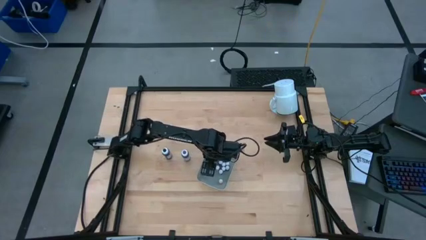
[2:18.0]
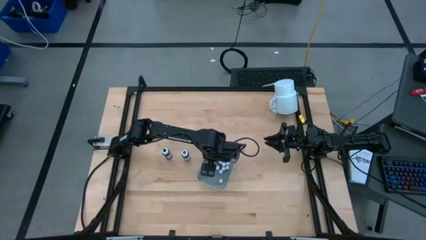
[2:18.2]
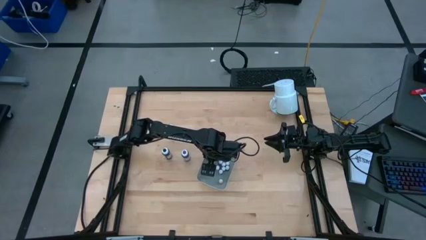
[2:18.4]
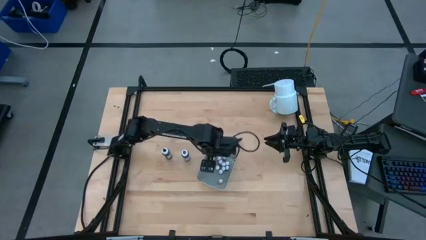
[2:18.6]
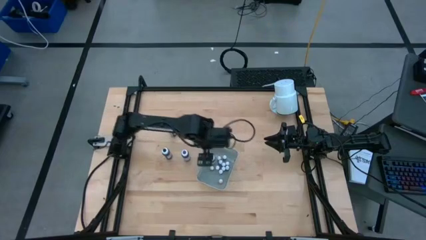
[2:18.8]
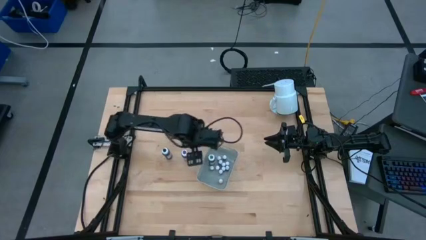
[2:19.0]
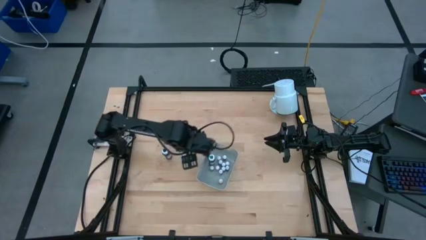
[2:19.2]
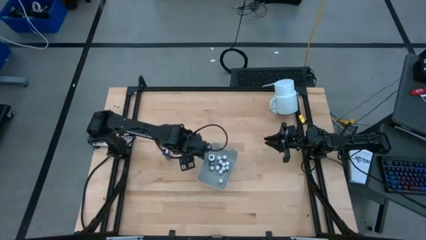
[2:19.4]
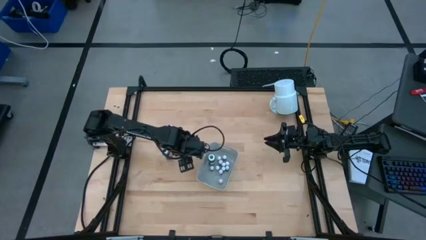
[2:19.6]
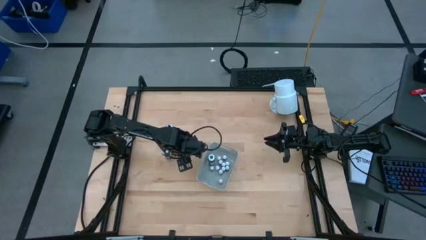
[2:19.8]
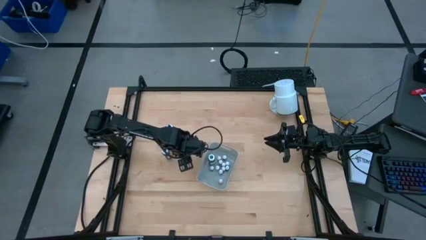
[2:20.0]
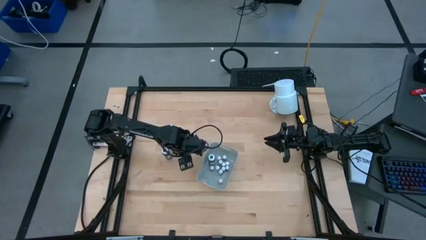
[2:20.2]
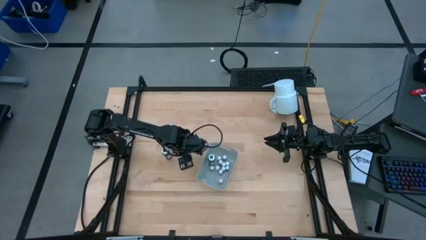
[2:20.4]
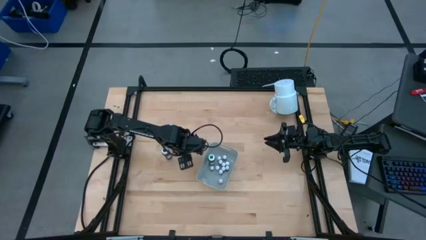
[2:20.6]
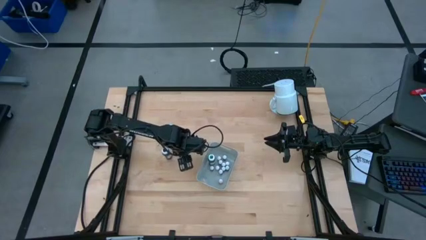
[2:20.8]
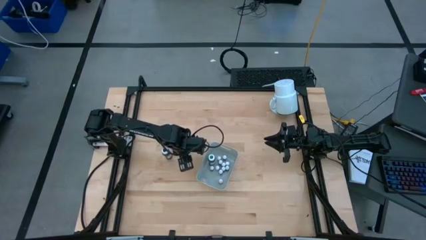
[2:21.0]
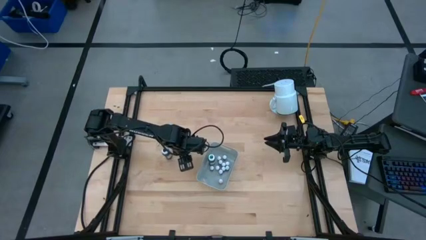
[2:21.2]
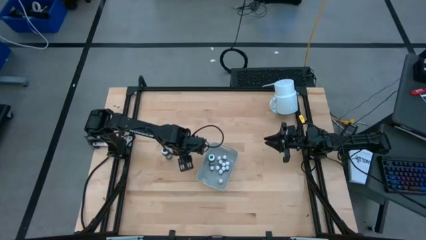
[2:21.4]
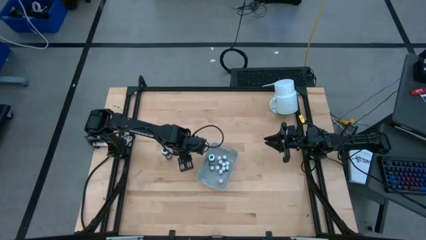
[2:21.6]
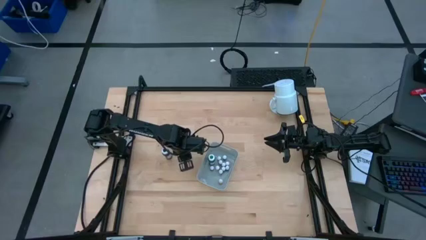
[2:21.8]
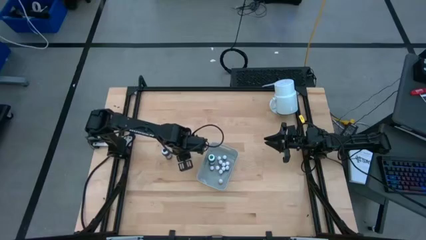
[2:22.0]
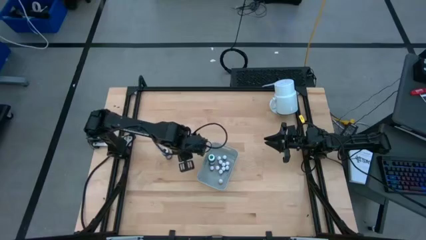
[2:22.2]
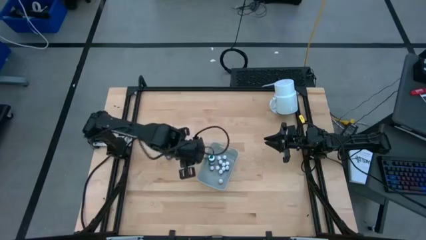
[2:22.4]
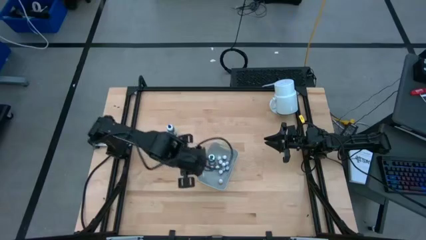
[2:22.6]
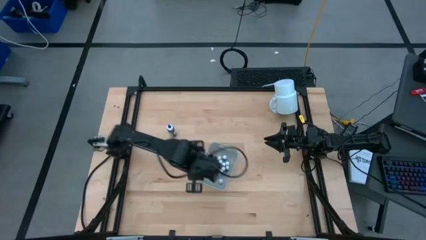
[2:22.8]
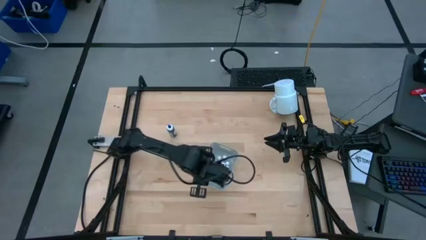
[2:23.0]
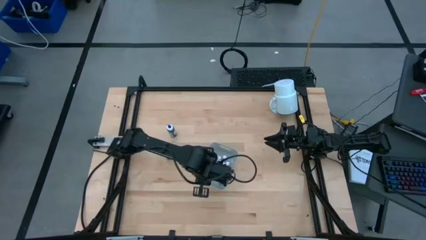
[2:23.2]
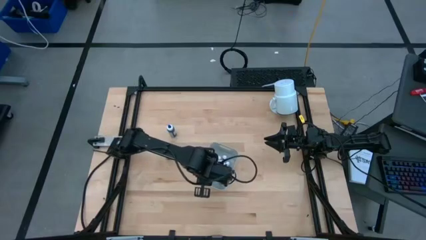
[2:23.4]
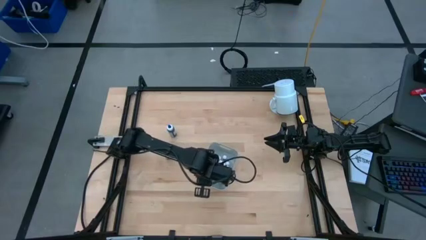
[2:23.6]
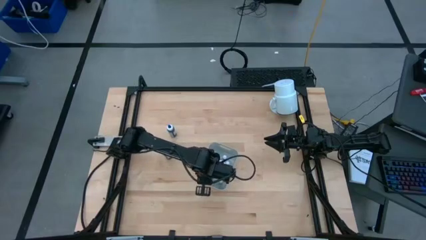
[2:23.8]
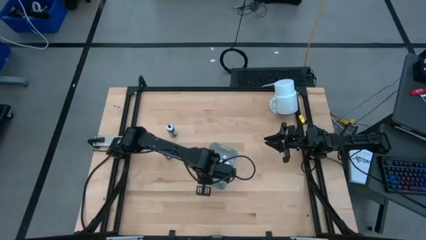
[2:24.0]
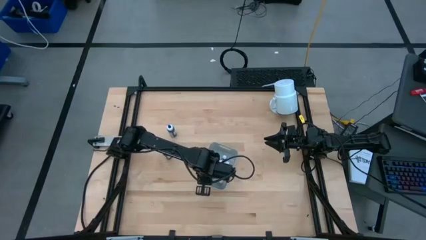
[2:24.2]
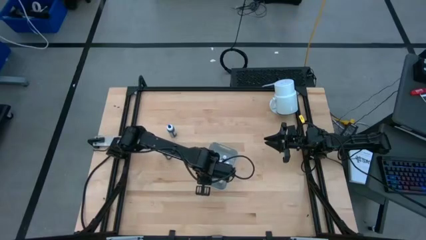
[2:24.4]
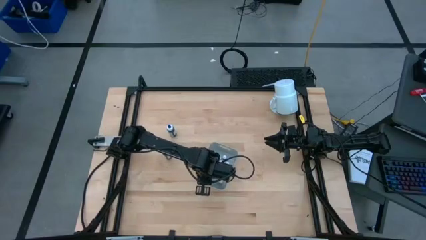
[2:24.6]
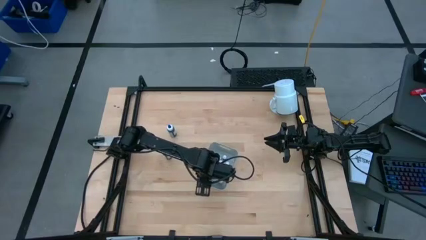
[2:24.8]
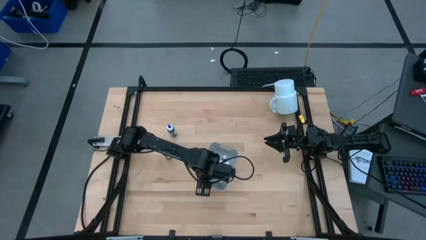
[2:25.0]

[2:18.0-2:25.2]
Task: Pick & Place food coloring
Put the large violet food coloring bottle into the white bin

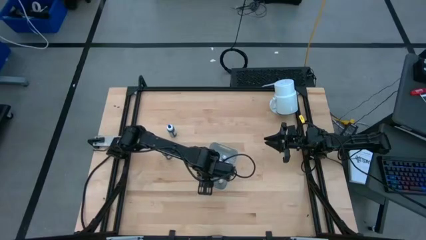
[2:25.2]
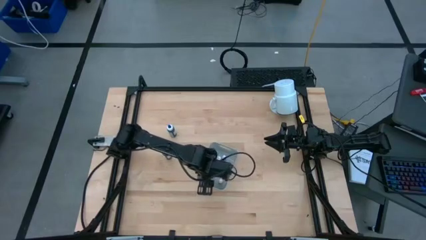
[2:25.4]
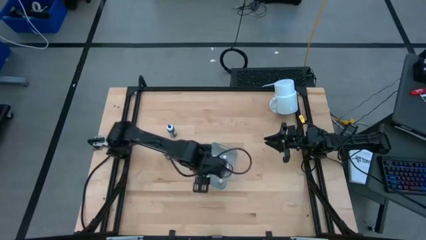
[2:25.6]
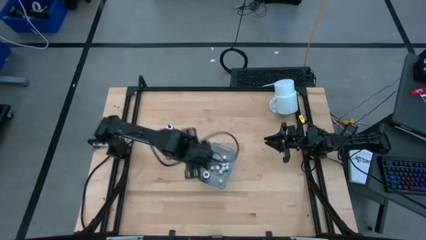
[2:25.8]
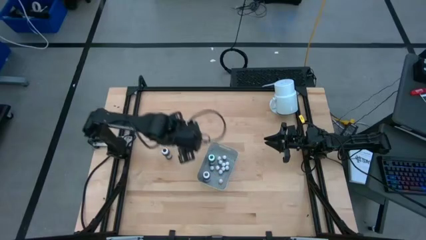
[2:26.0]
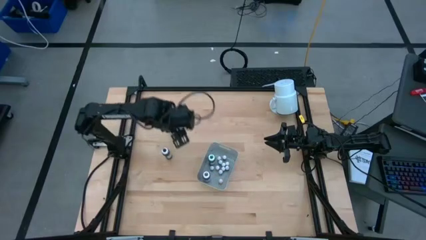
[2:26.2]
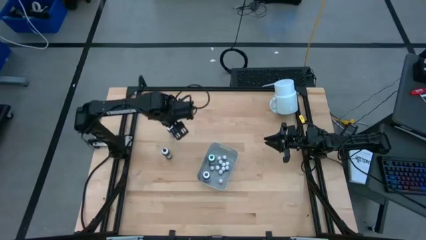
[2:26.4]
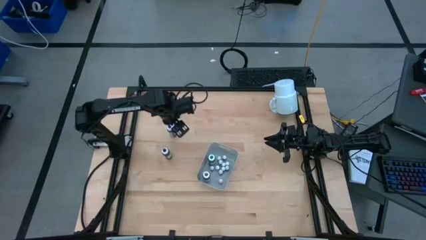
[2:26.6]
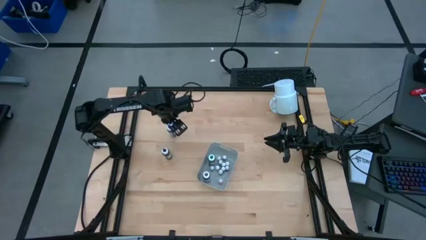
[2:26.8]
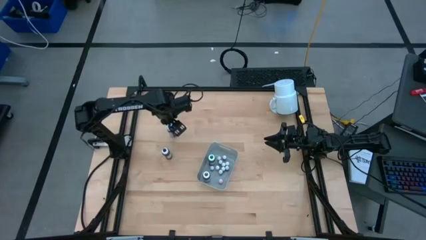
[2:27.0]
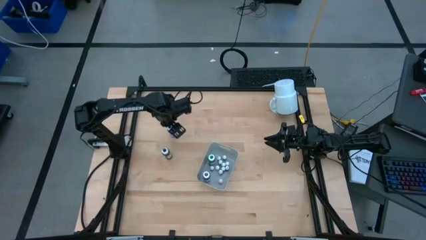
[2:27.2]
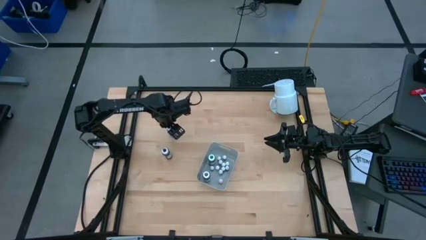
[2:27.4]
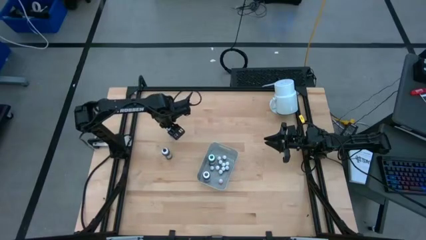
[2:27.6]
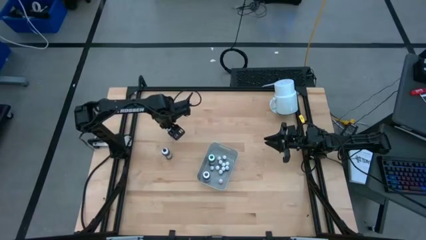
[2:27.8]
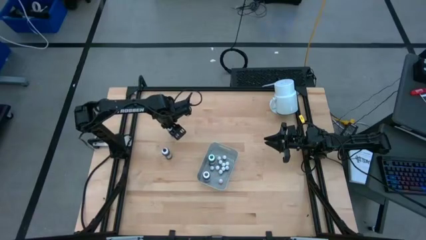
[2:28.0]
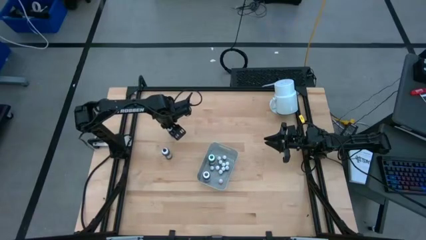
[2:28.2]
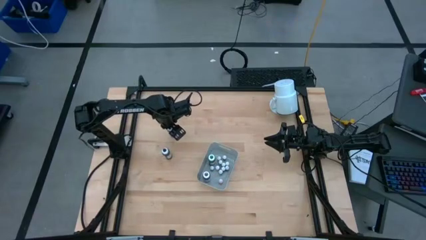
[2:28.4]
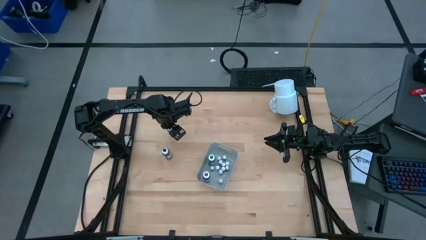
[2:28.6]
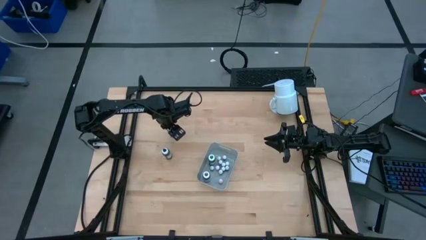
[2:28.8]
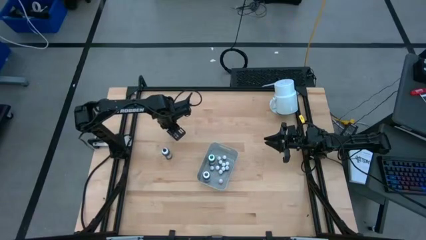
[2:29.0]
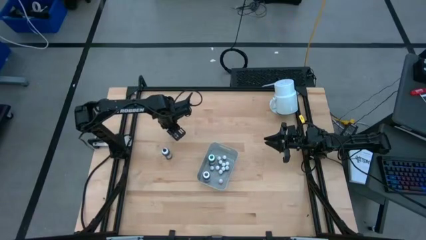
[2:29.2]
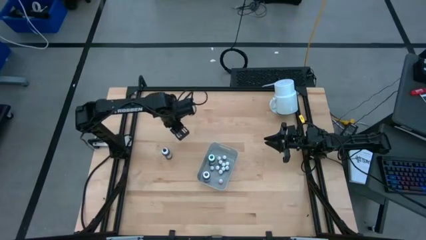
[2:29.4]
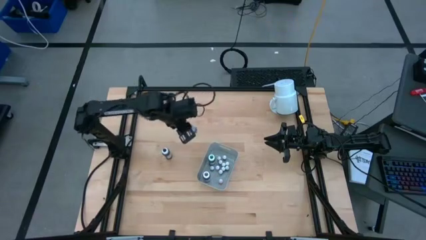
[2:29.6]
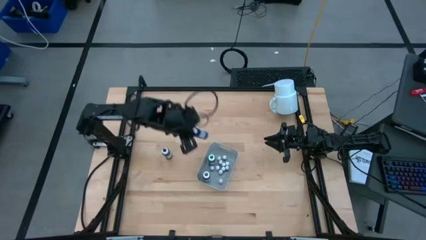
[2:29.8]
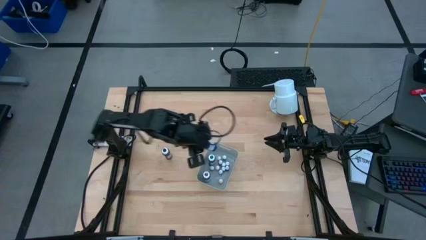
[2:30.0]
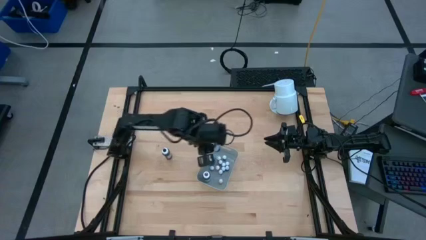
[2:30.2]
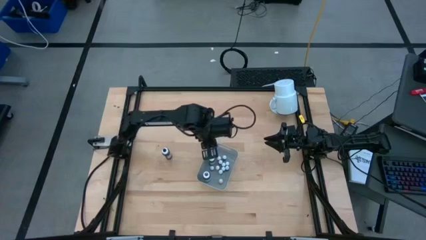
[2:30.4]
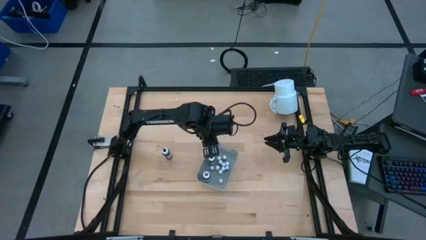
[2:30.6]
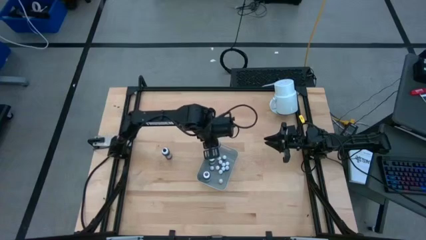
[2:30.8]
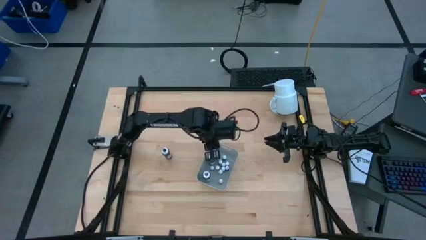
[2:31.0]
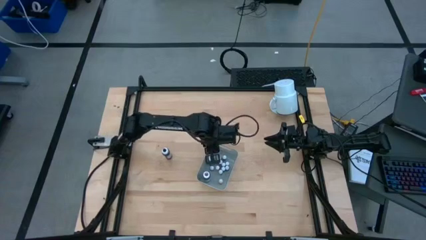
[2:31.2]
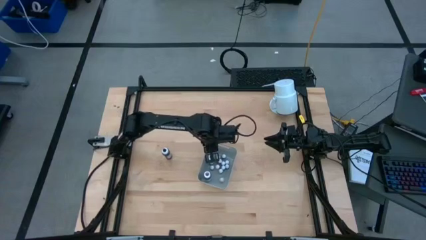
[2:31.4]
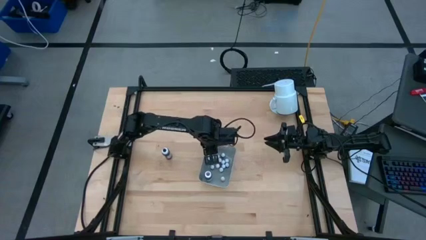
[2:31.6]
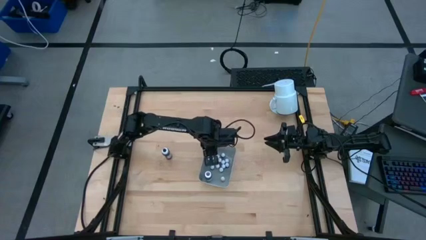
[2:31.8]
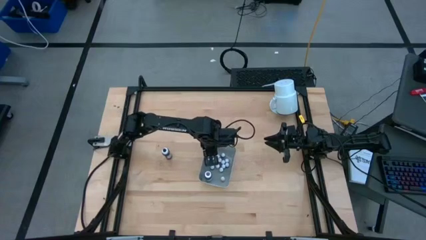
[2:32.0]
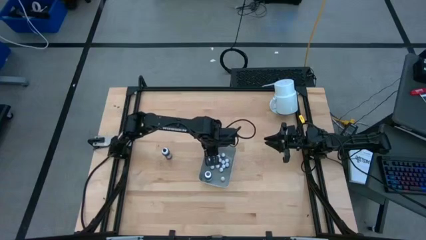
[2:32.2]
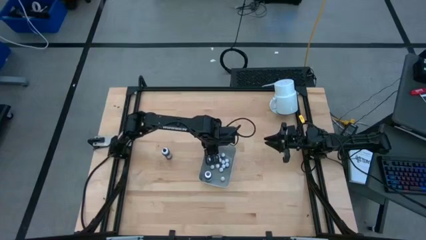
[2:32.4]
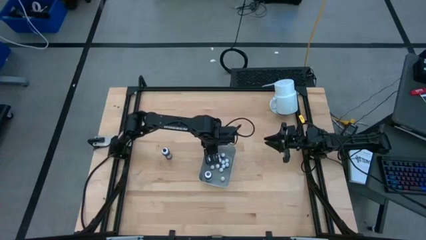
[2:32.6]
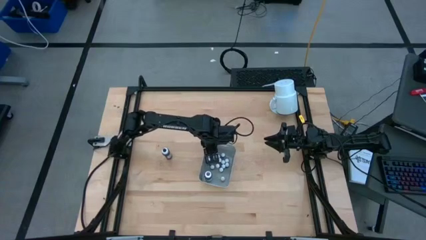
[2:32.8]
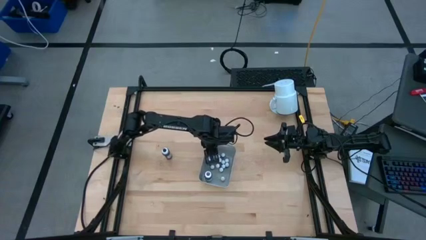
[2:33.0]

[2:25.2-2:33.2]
Put the large blue food coloring bottle into the white bin

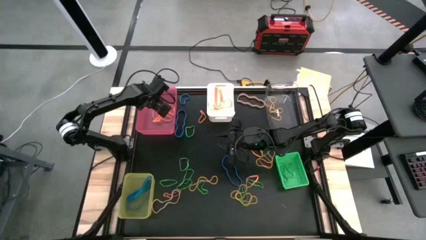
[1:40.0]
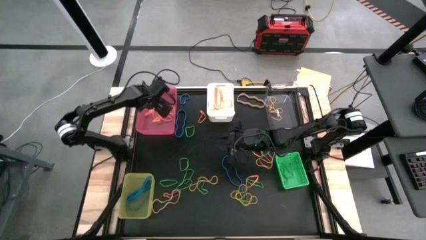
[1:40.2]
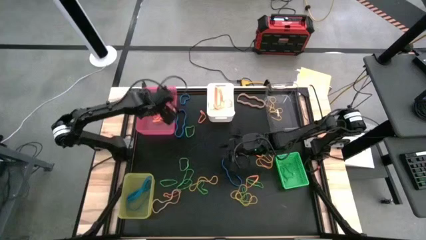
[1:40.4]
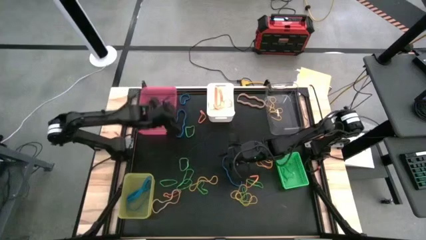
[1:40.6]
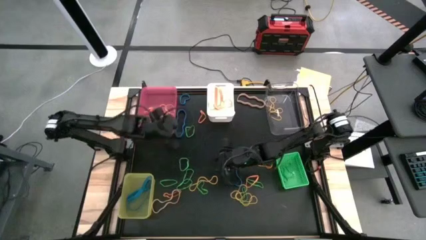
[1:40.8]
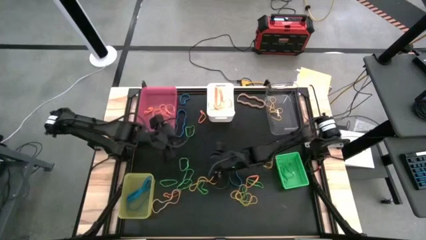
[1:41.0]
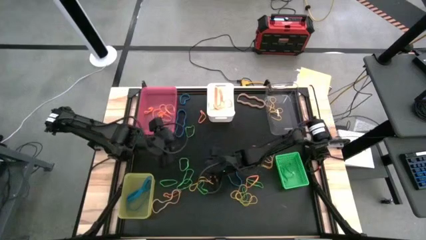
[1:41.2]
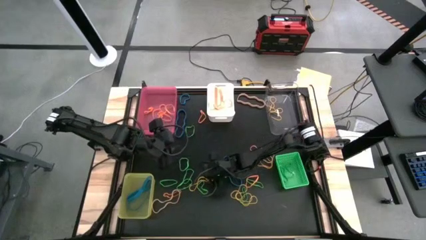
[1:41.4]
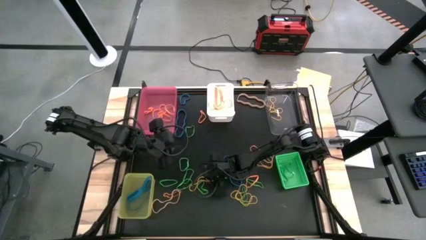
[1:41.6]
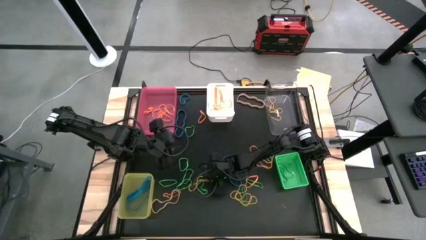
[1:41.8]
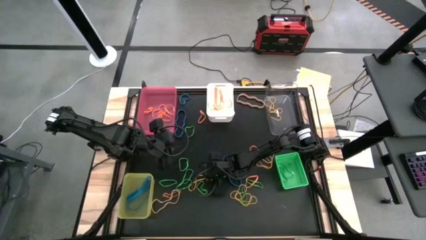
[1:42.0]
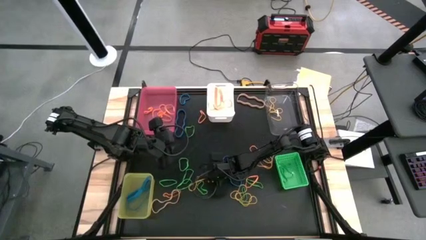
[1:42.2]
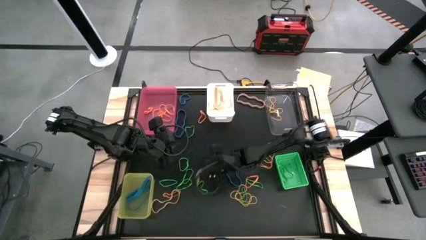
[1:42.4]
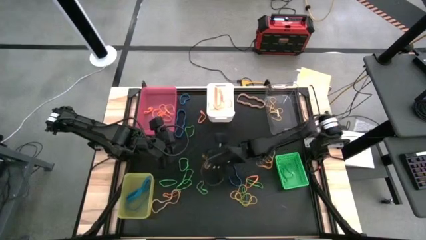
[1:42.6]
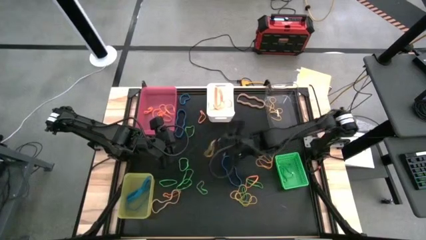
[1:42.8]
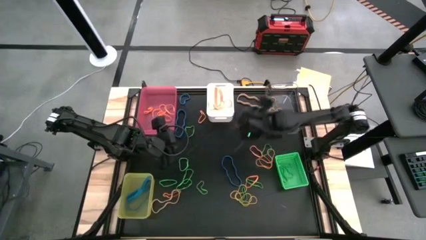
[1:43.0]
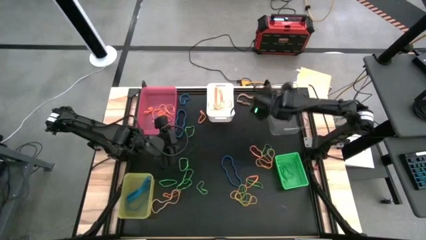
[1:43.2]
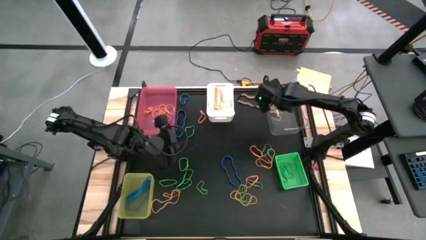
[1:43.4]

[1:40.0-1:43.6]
Task: Sort rubber bands into baskets
Put the yellow rubber band into the transparent bin
